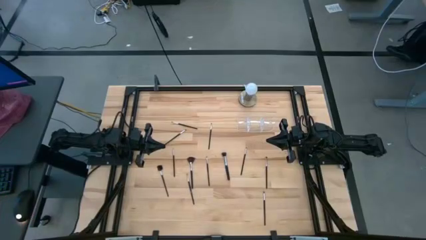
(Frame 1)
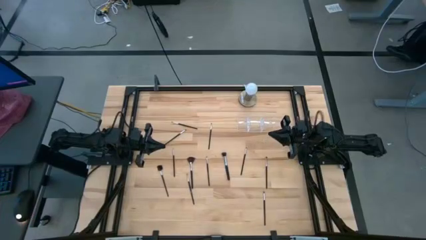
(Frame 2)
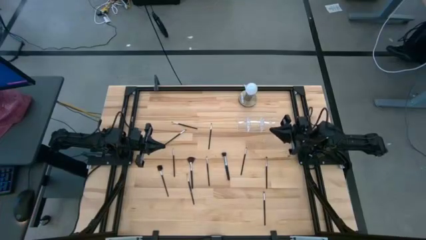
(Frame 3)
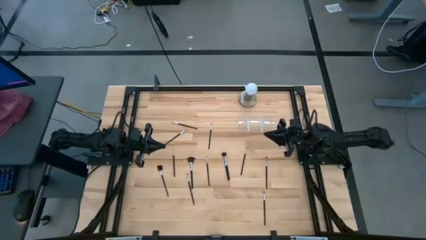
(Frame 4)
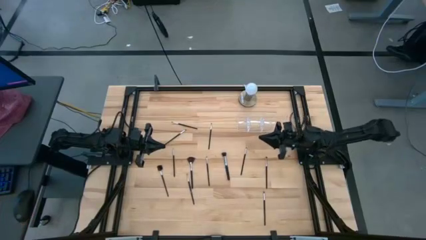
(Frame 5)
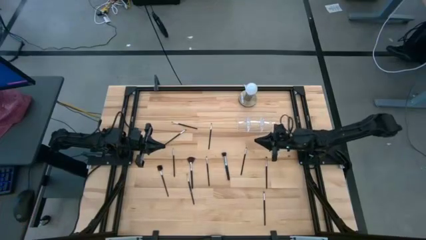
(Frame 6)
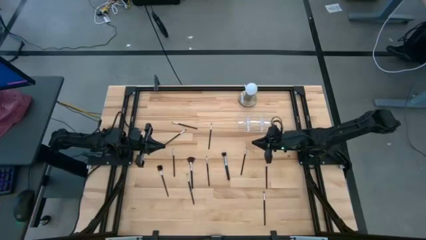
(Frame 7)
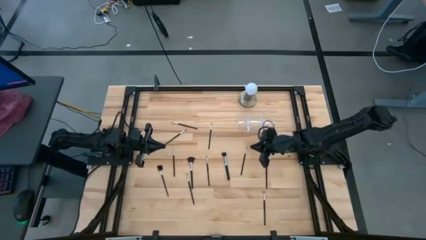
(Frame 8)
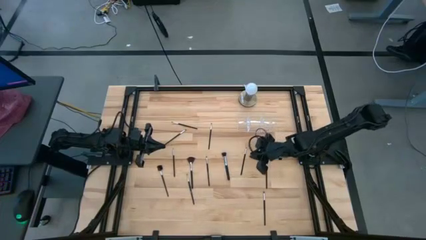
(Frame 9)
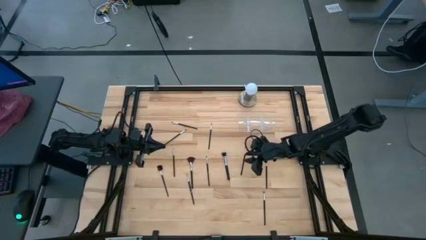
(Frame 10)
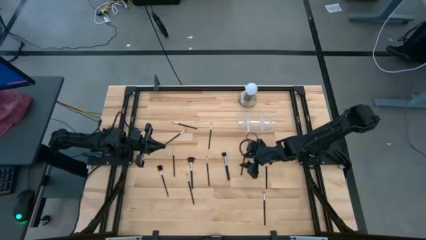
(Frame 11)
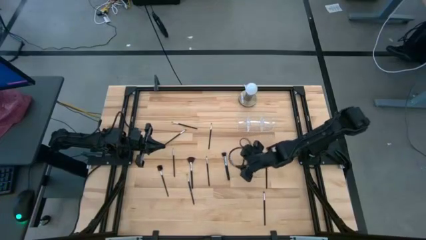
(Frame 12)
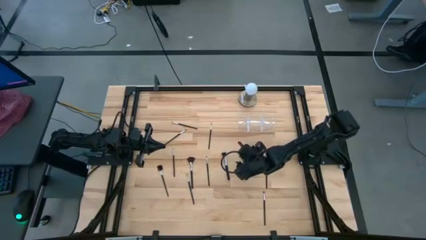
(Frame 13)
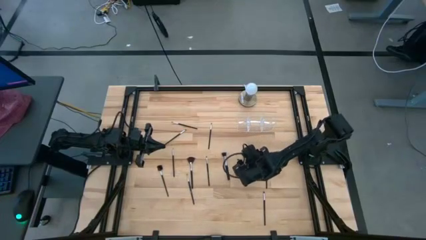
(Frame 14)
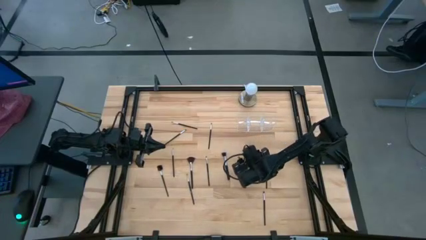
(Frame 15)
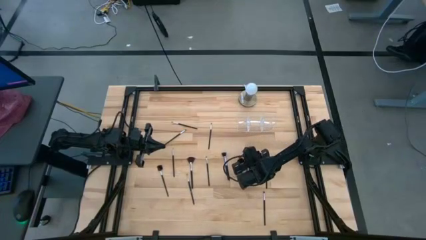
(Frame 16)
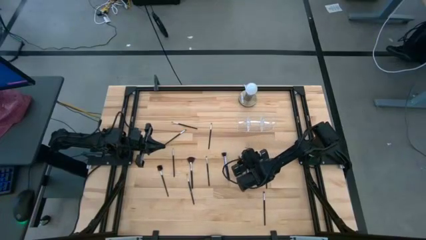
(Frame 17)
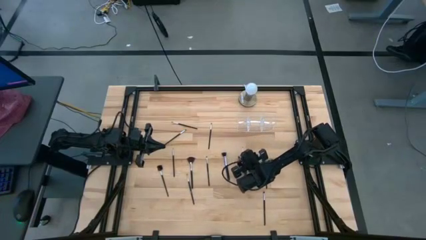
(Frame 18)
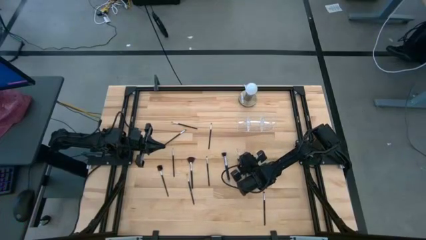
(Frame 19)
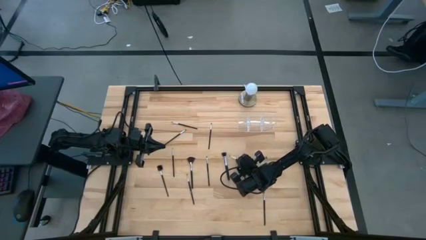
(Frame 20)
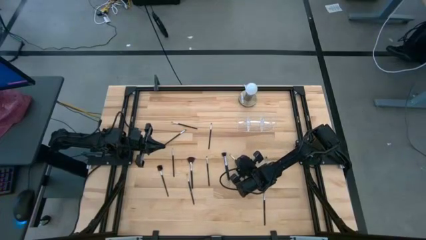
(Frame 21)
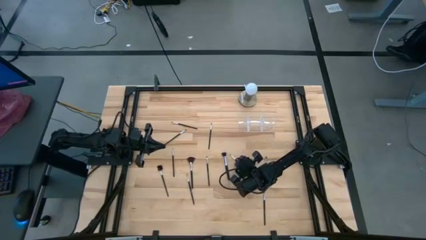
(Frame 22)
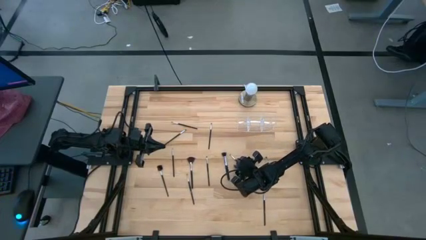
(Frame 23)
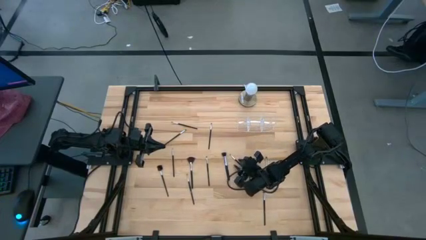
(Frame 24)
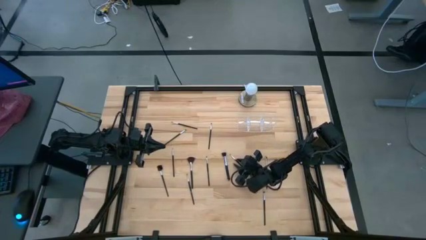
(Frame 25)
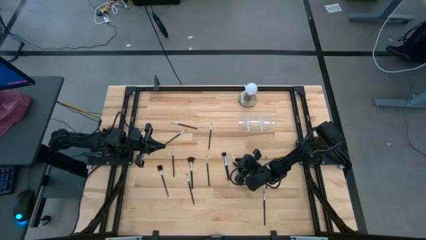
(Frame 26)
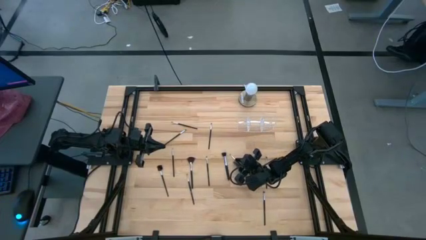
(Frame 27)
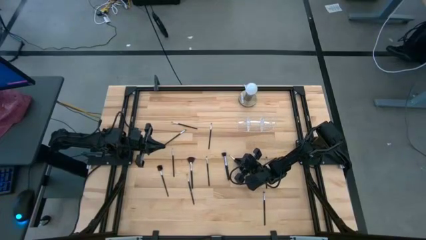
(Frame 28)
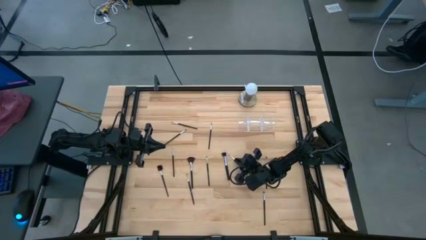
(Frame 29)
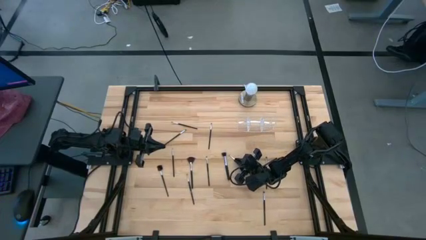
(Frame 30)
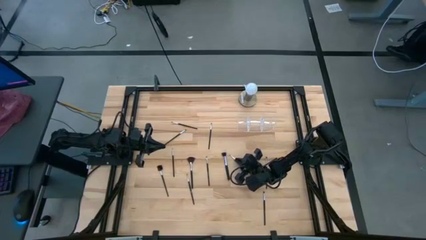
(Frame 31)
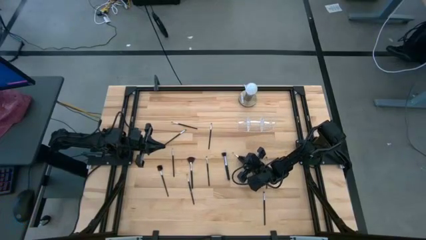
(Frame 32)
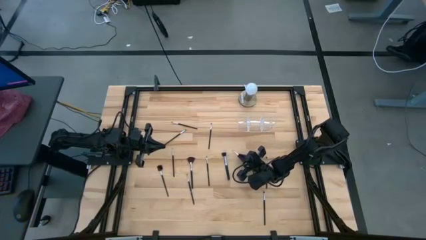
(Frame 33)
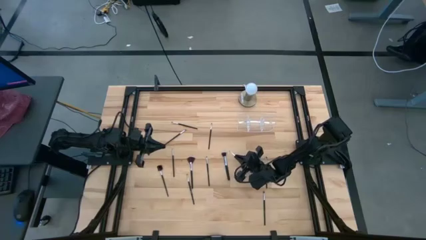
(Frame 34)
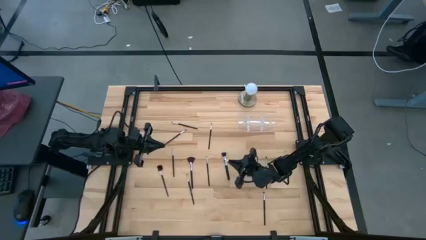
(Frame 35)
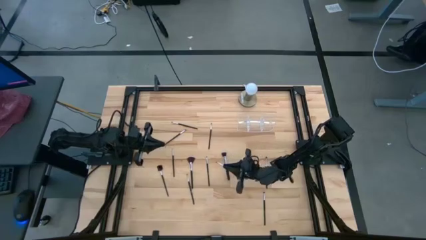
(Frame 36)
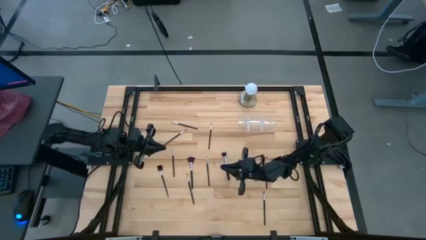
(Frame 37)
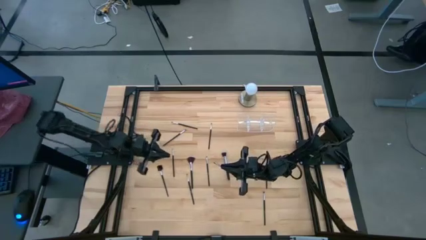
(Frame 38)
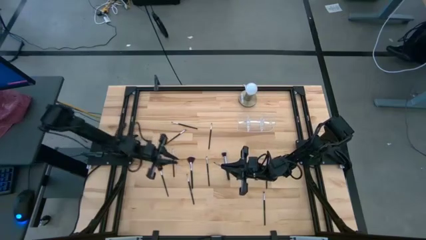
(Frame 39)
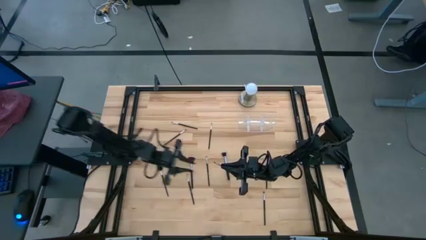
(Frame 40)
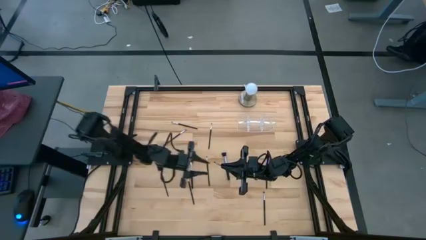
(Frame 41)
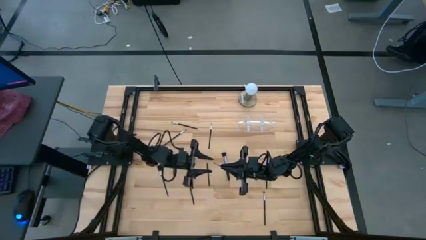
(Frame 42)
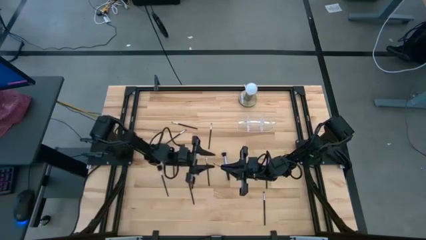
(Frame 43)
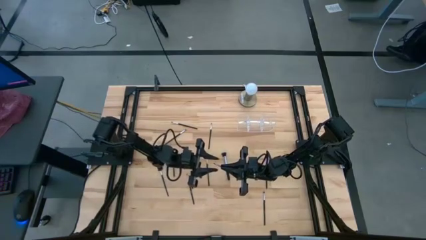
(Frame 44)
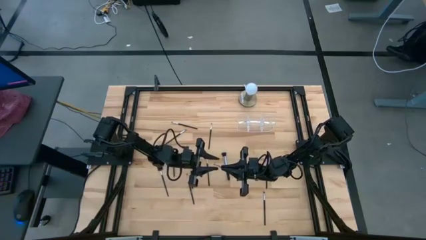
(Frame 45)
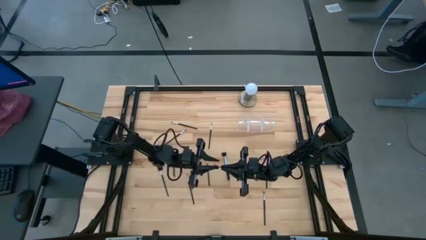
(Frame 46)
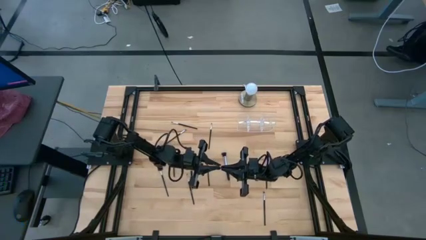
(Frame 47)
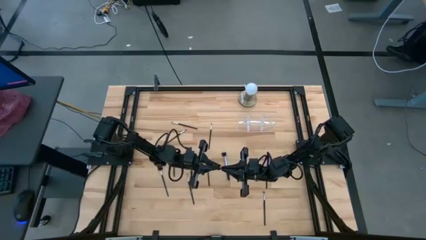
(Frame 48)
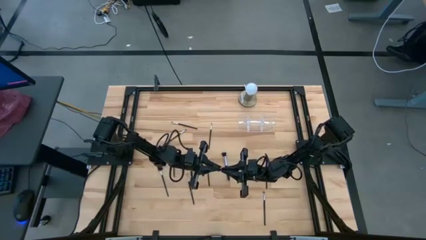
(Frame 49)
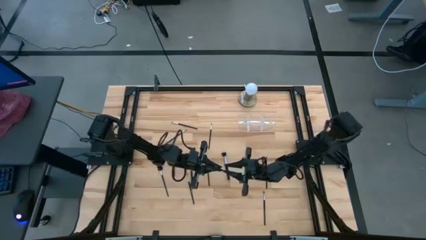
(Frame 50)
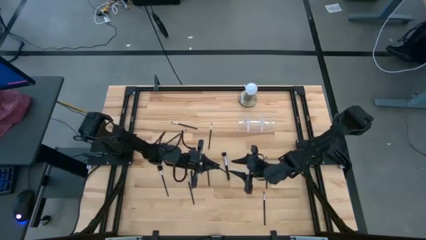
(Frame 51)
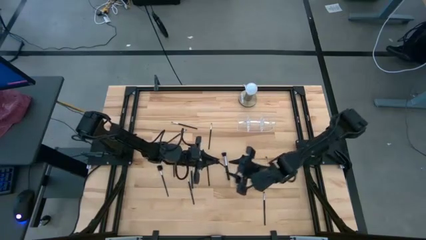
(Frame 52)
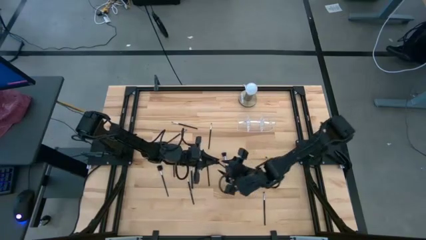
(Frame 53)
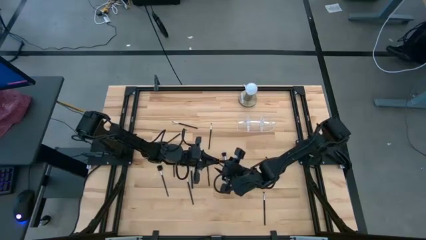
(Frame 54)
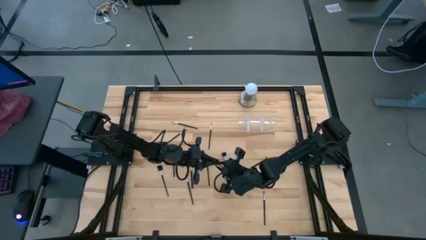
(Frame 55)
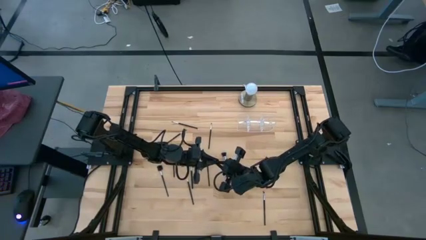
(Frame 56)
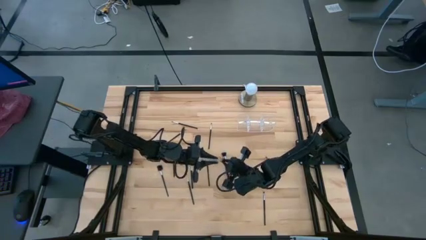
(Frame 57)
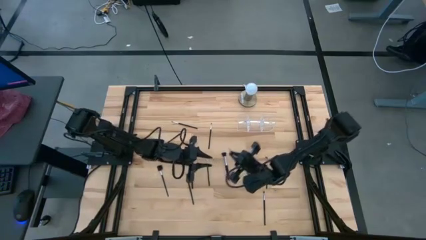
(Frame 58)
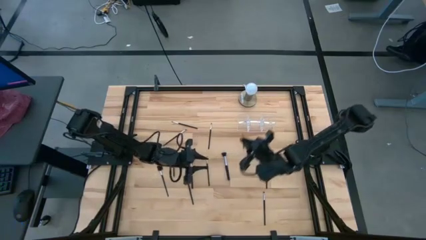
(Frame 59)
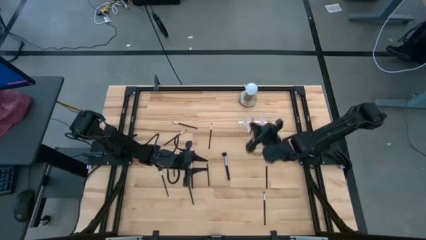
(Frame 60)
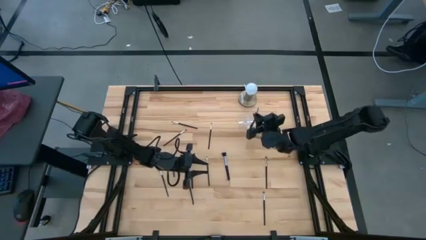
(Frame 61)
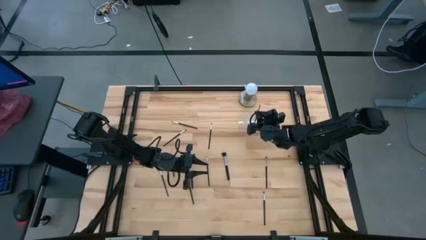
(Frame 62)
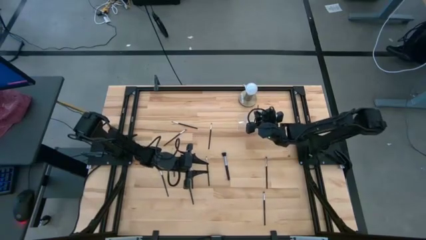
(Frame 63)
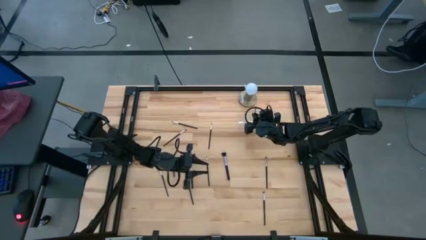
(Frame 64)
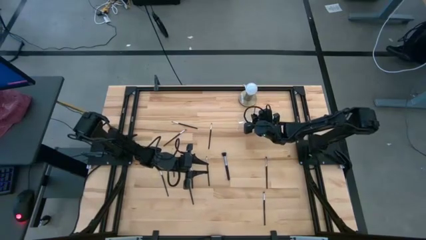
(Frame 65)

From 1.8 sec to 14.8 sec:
Task: Put items in baskets/containers
Put the eyeshadow brush into the transparent organizer
